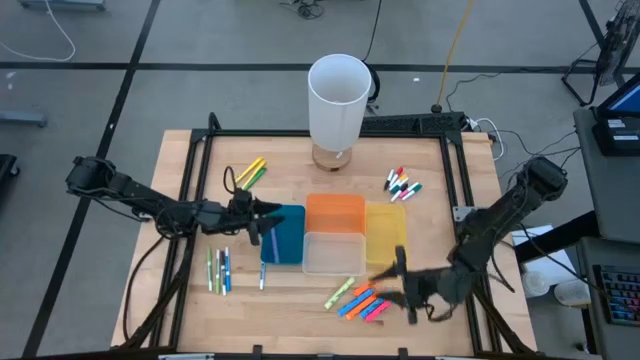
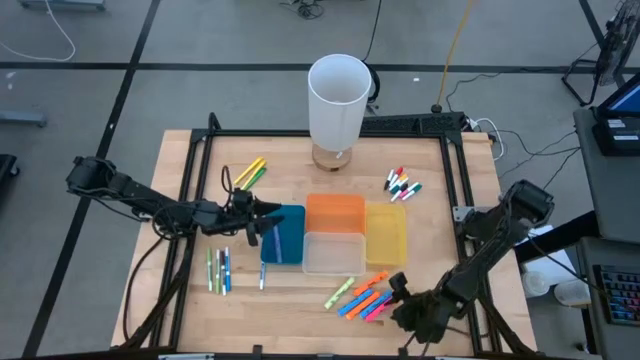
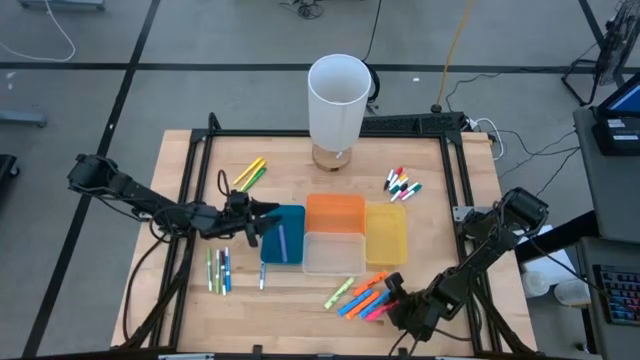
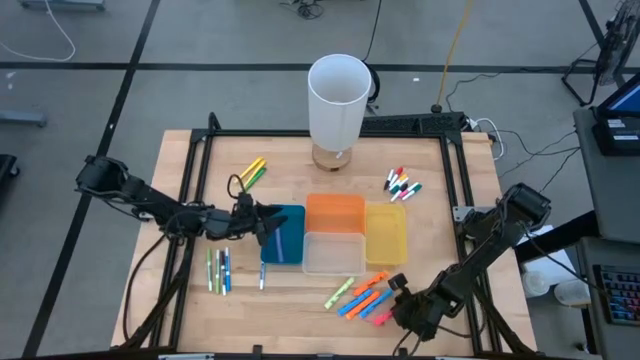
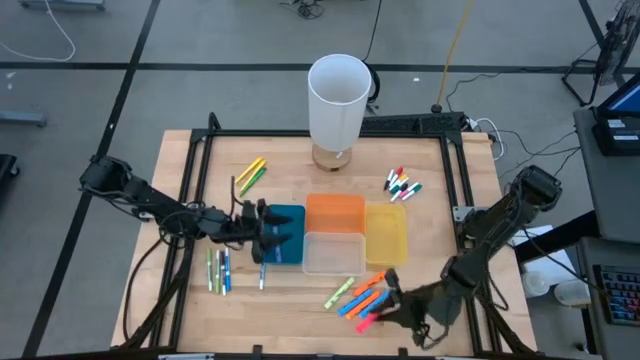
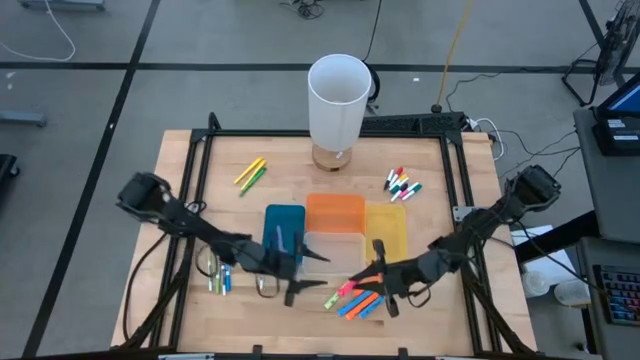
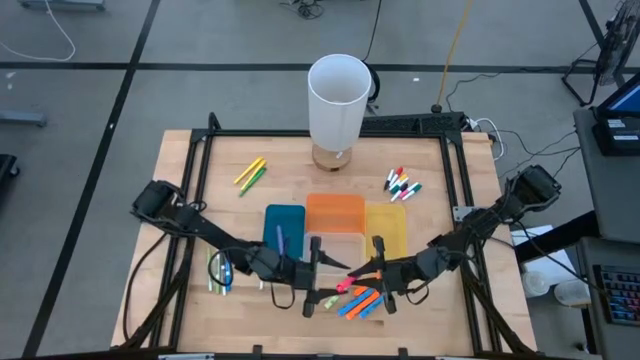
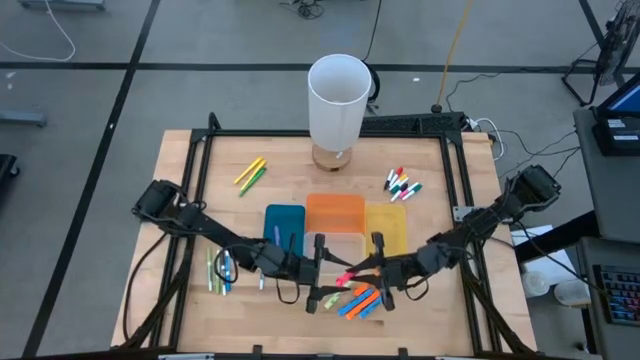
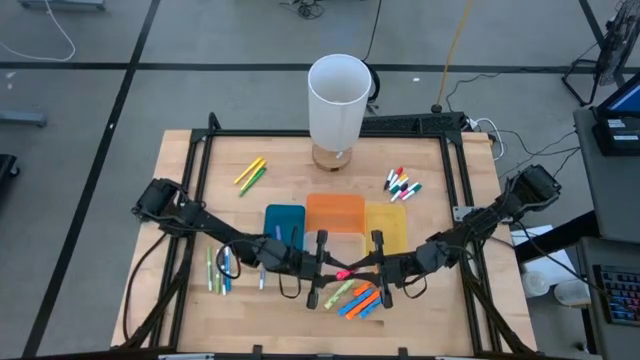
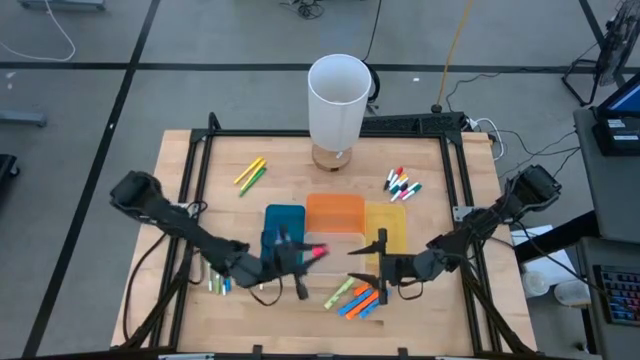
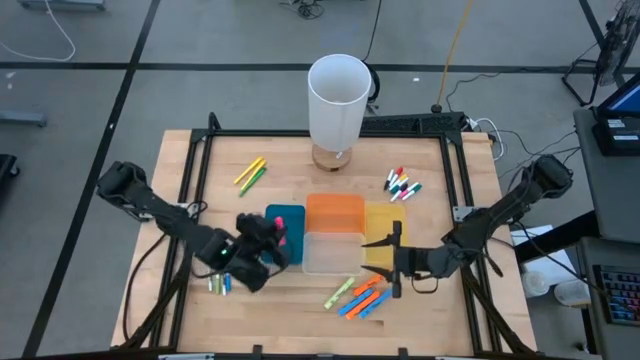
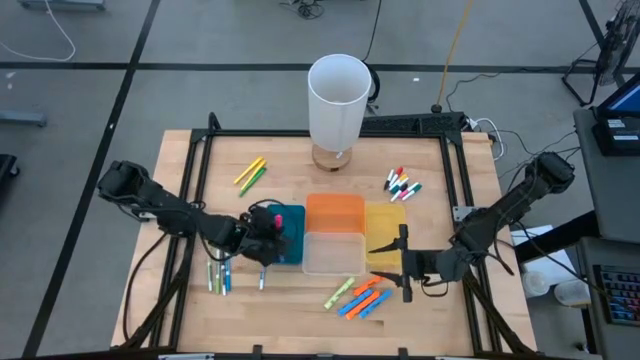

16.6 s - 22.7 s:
Task: Pick & Place Markers
Put the large pink highlighter pen into the blue bin

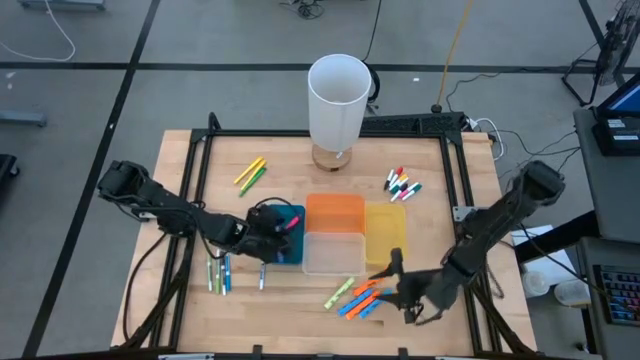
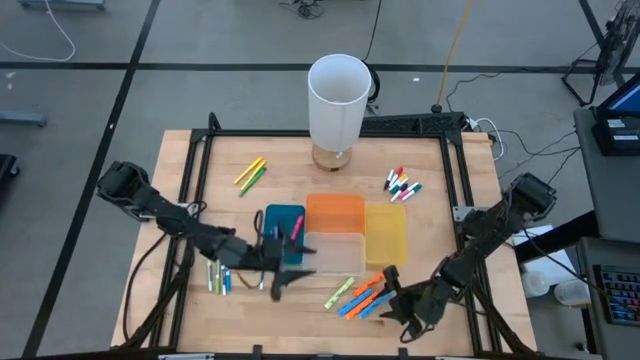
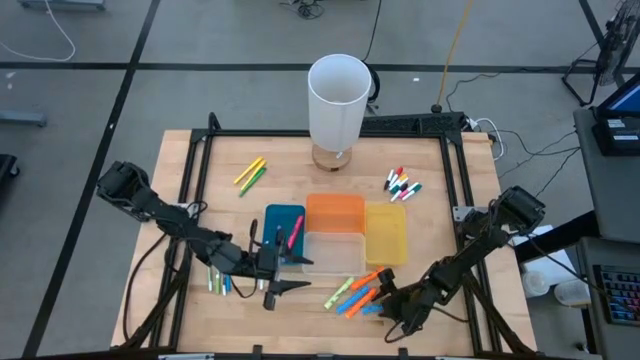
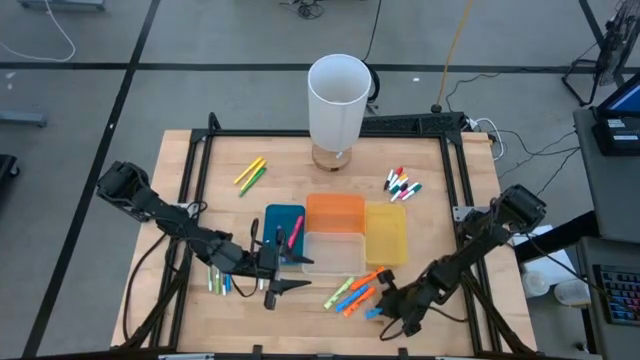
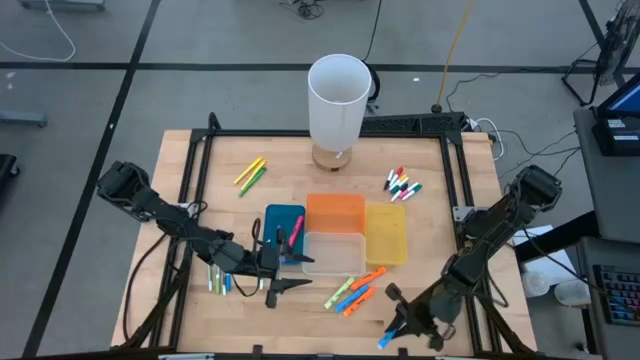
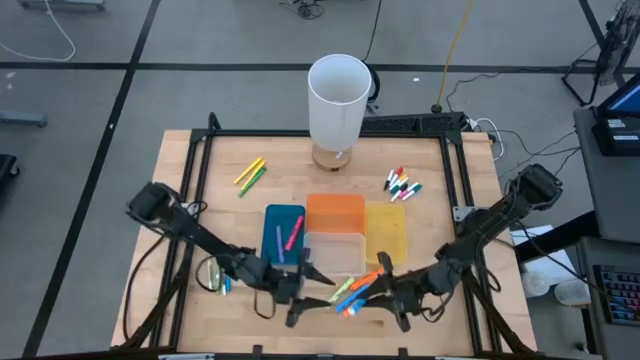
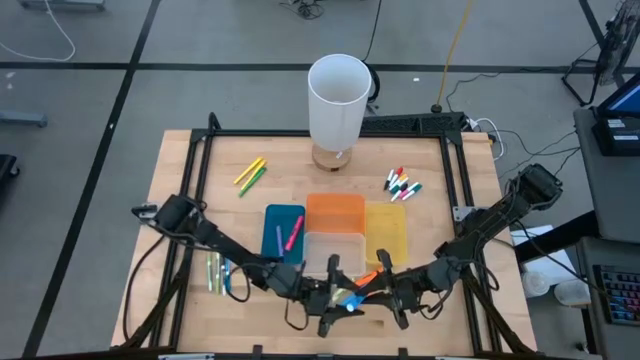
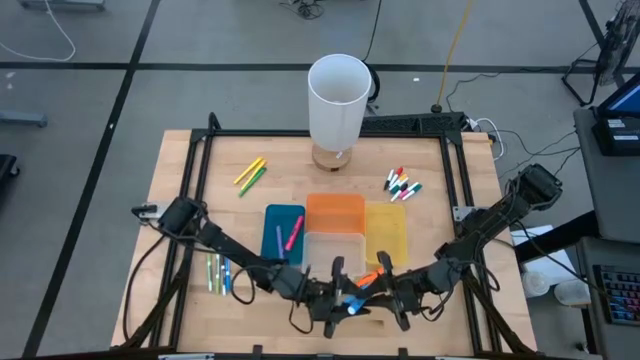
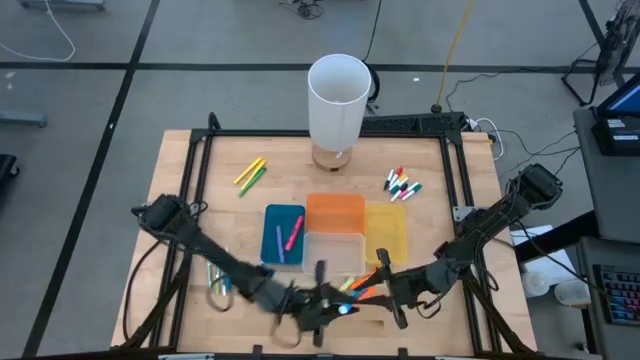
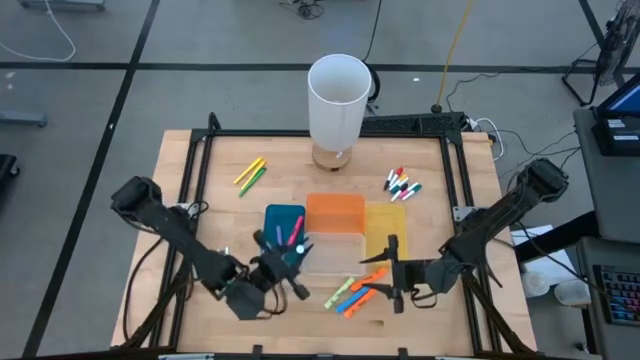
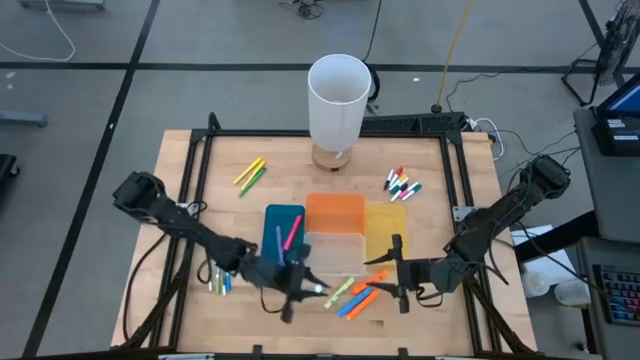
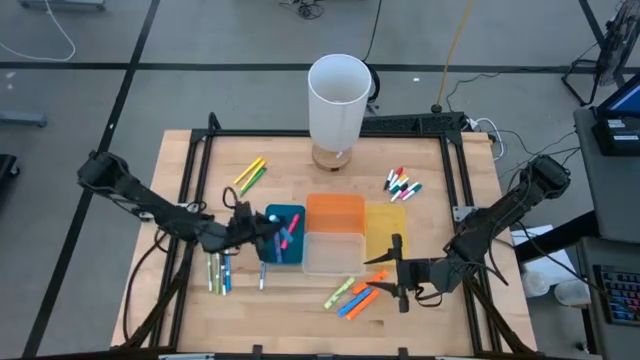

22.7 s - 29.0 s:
Put the large right blue highlighter pen into the blue bin

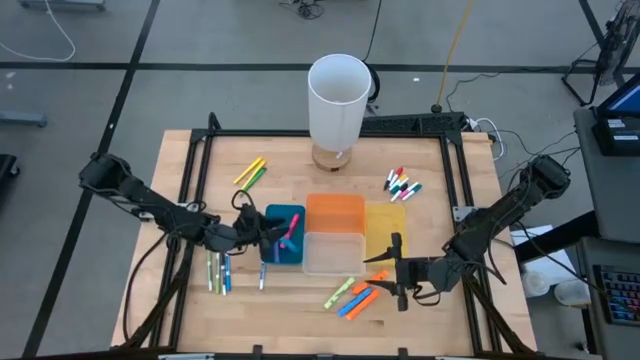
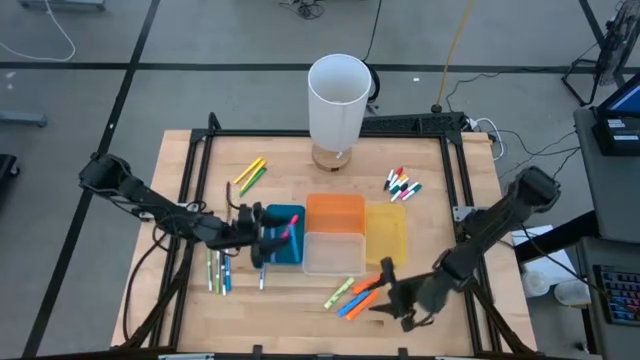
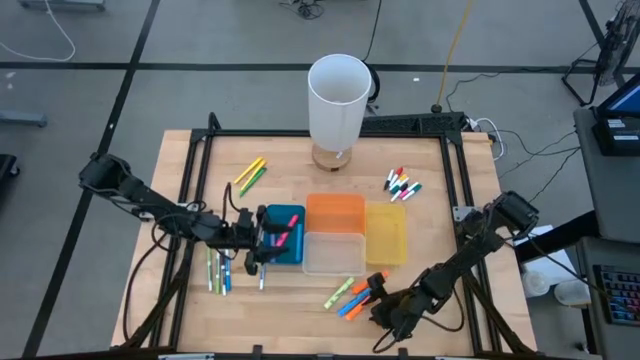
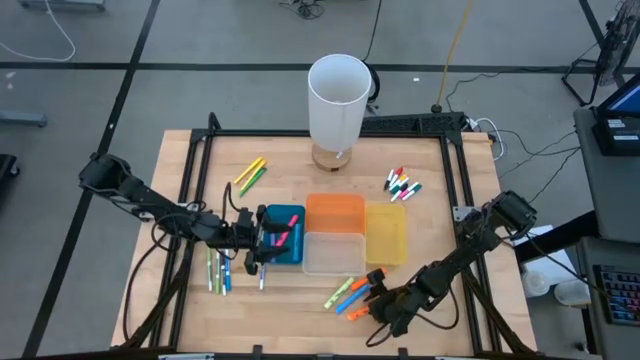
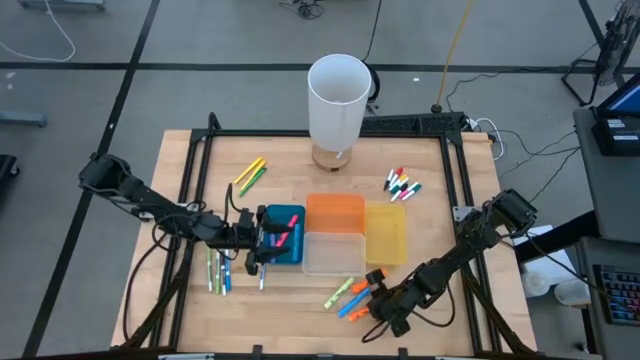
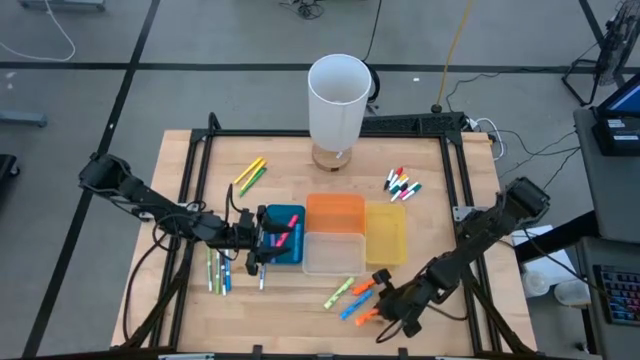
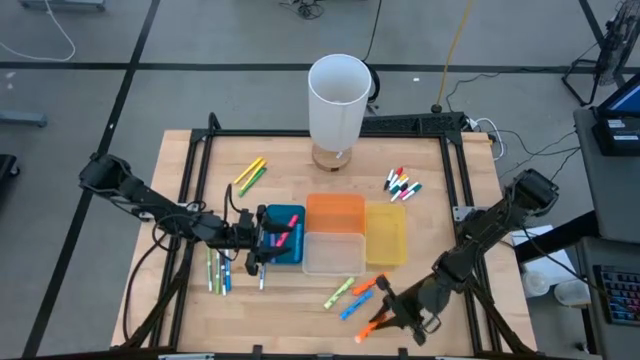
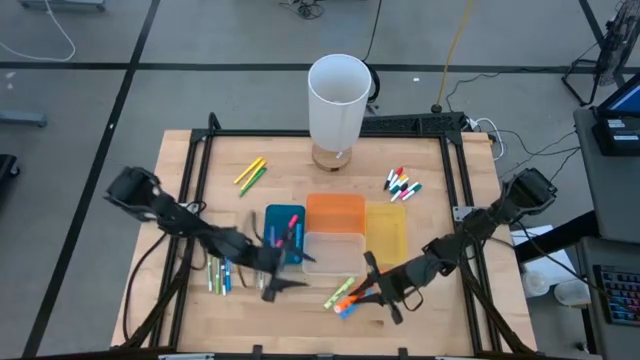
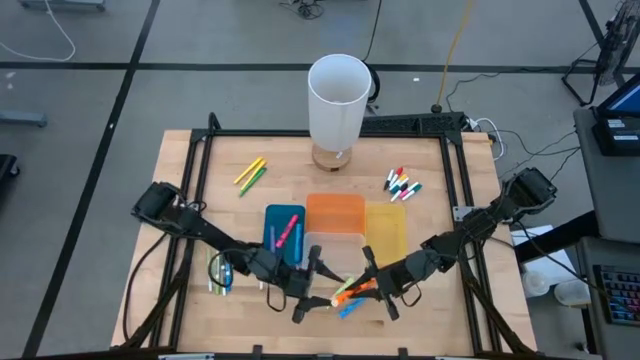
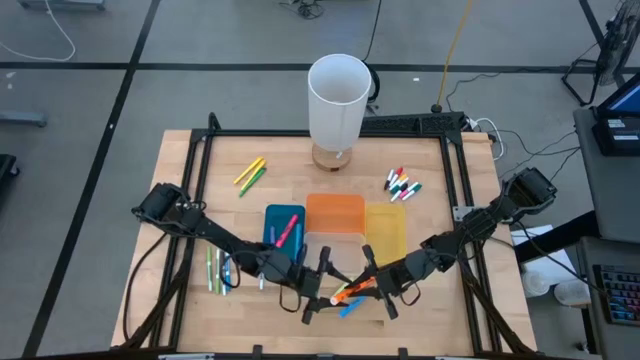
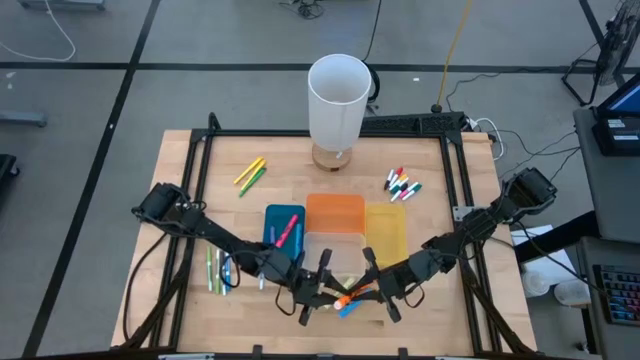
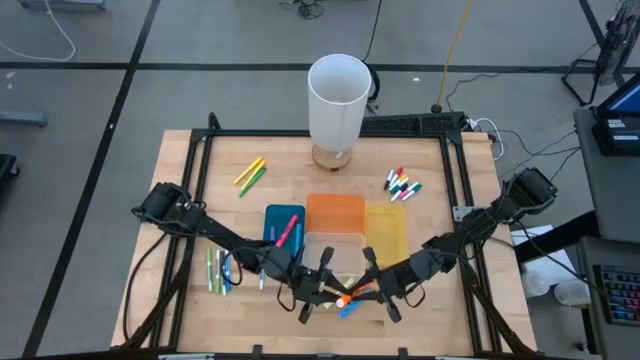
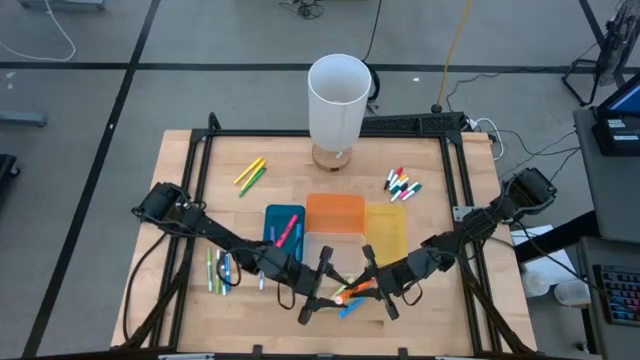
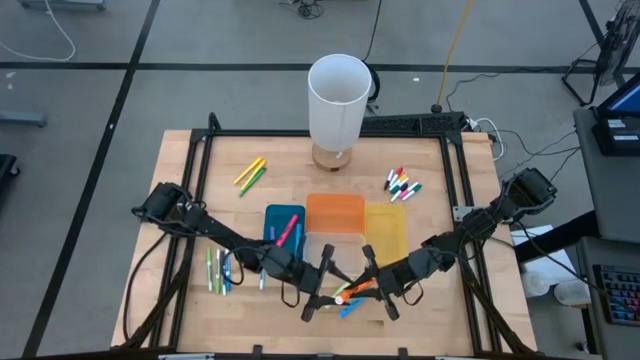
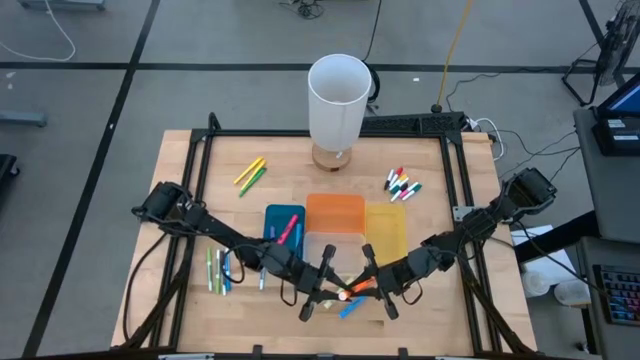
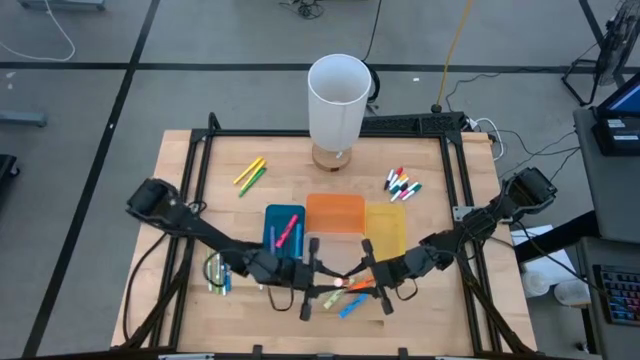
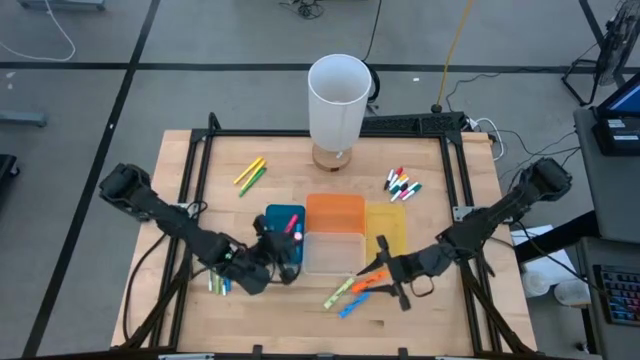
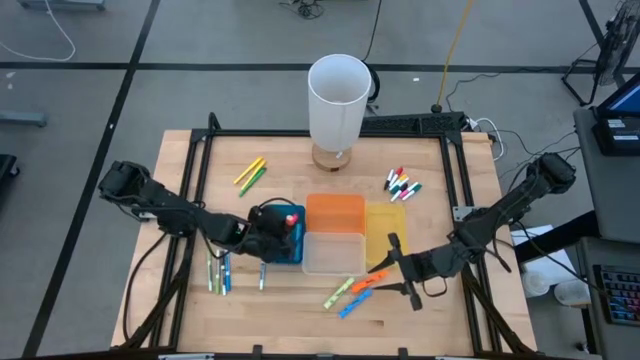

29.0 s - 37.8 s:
Put the large bottom orange highlighter pen into the blue bin
